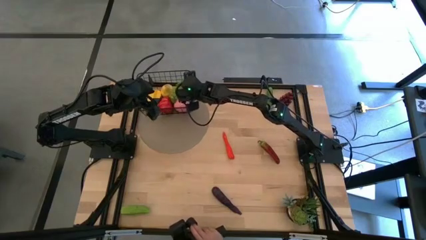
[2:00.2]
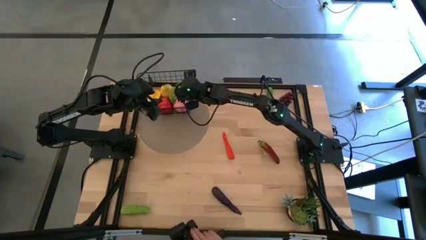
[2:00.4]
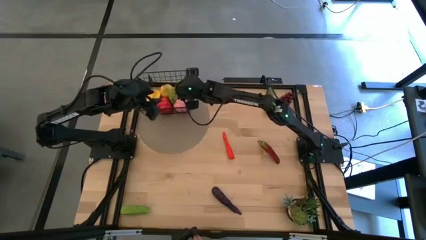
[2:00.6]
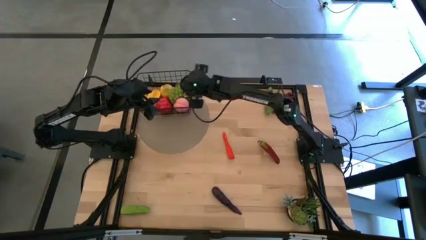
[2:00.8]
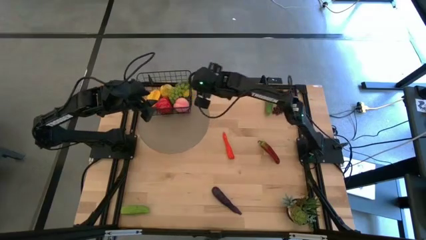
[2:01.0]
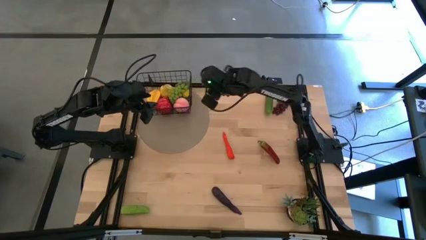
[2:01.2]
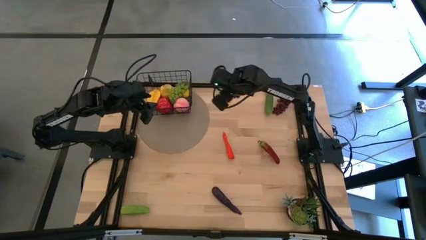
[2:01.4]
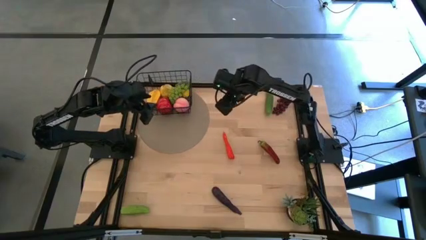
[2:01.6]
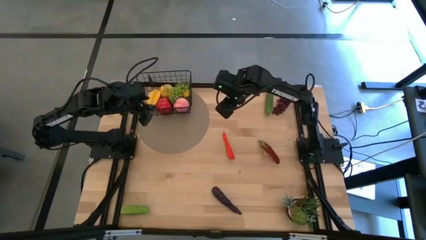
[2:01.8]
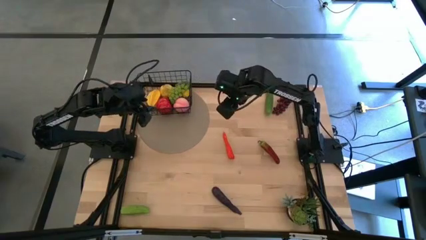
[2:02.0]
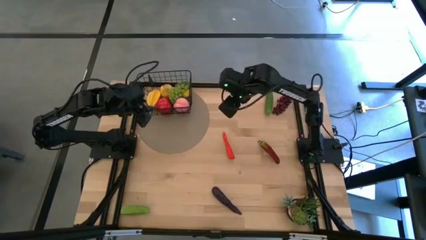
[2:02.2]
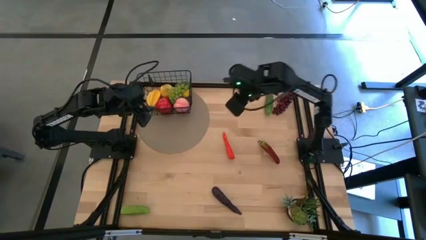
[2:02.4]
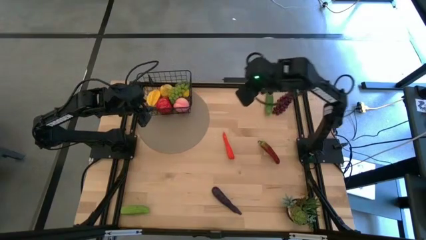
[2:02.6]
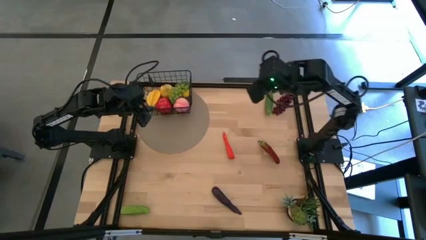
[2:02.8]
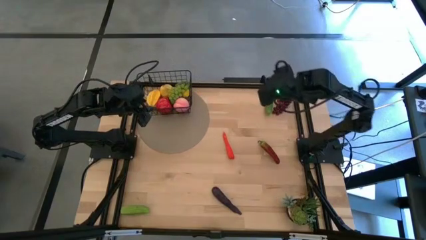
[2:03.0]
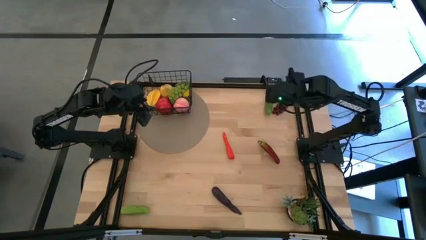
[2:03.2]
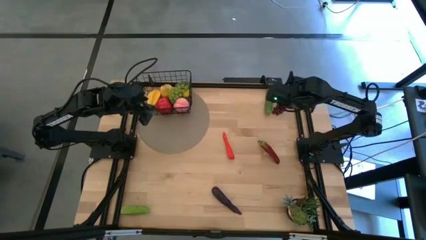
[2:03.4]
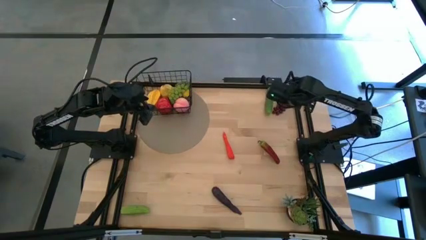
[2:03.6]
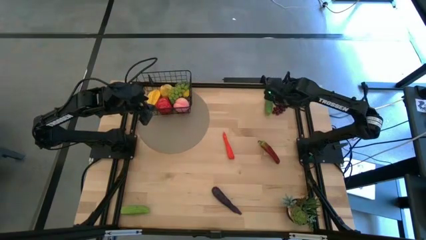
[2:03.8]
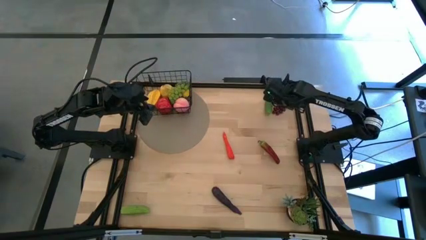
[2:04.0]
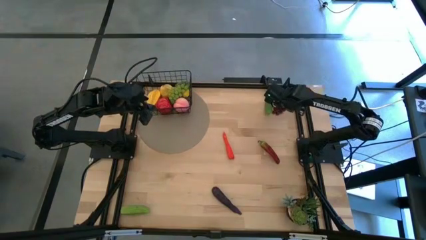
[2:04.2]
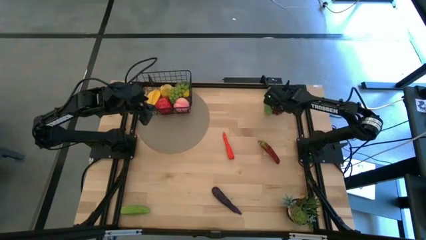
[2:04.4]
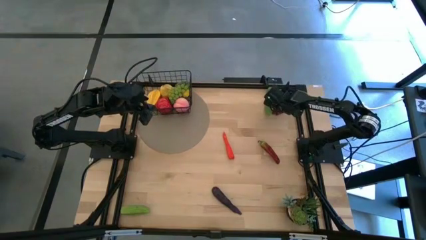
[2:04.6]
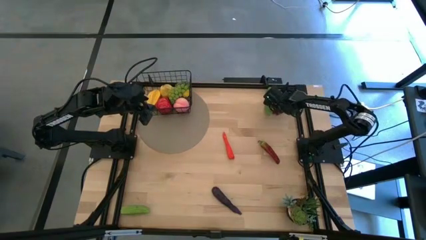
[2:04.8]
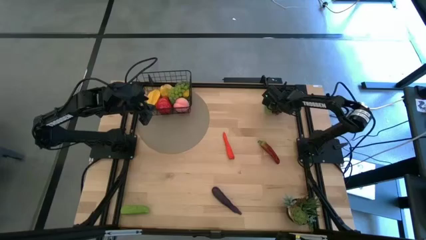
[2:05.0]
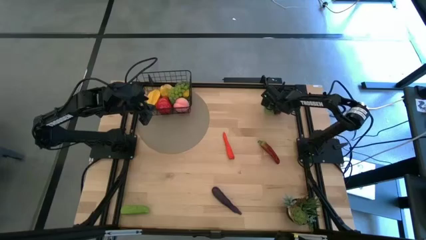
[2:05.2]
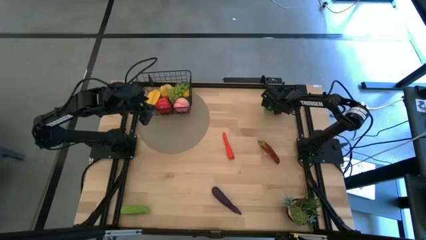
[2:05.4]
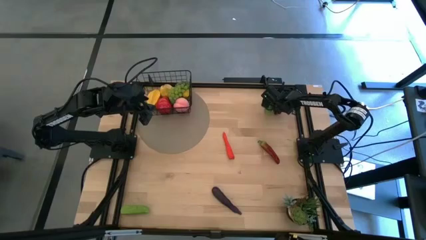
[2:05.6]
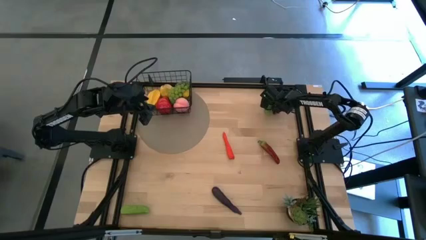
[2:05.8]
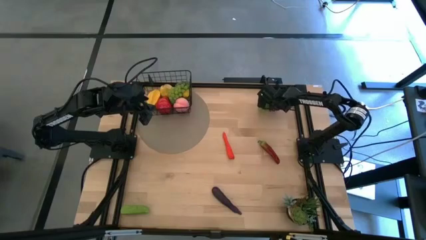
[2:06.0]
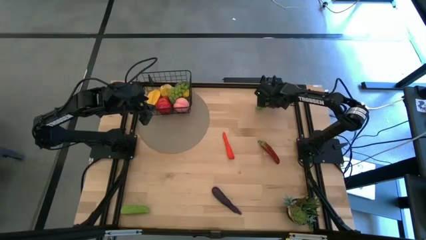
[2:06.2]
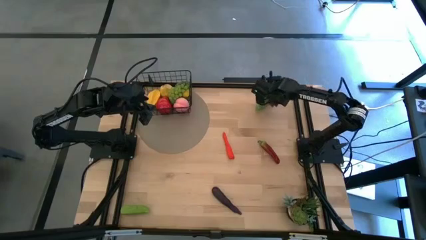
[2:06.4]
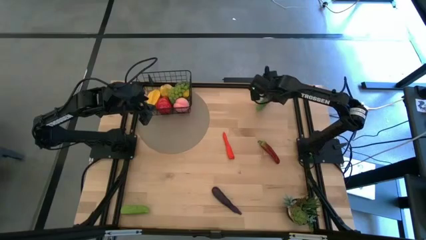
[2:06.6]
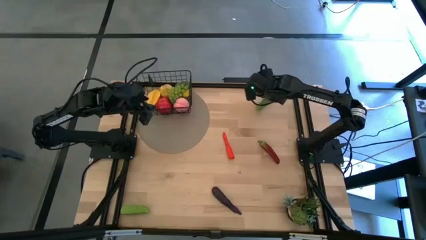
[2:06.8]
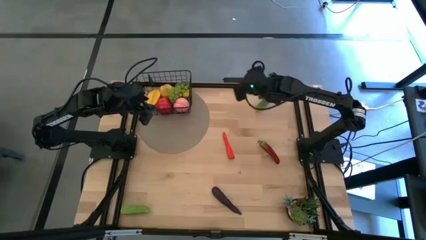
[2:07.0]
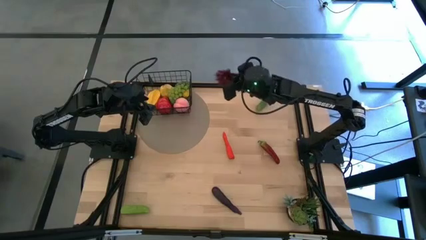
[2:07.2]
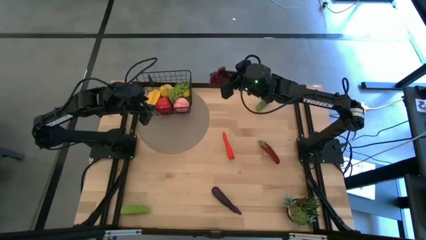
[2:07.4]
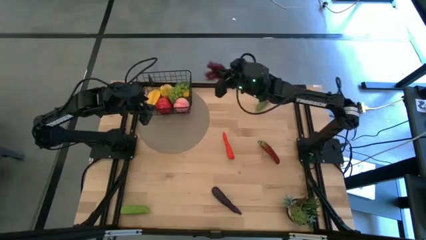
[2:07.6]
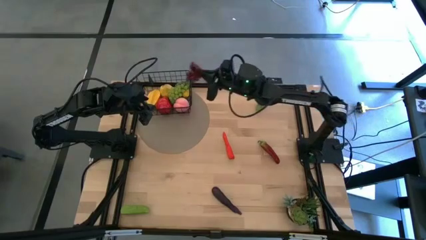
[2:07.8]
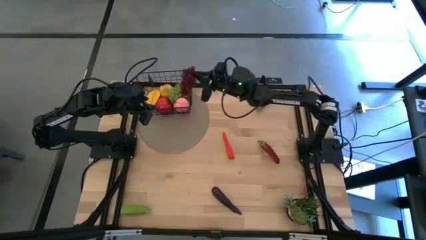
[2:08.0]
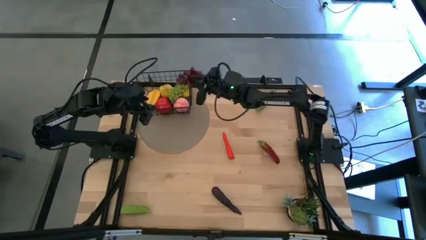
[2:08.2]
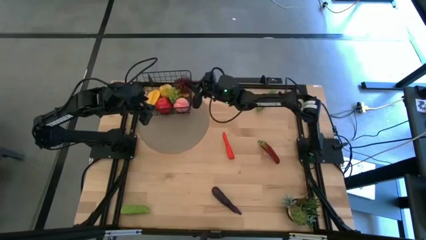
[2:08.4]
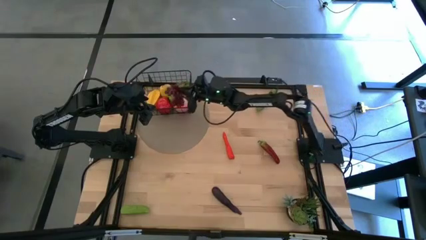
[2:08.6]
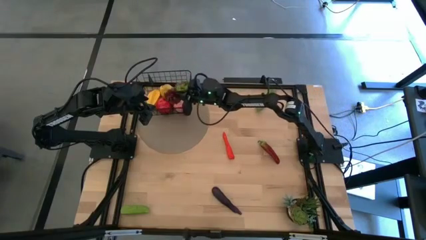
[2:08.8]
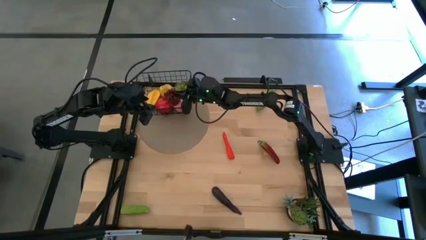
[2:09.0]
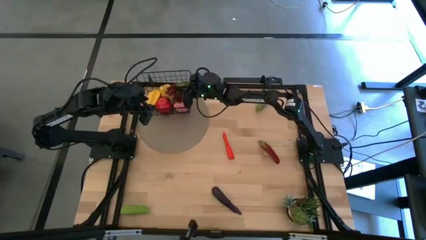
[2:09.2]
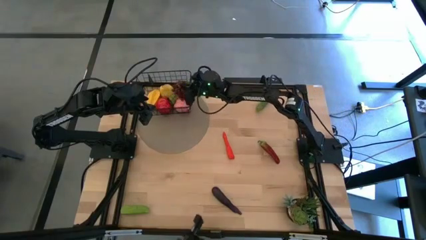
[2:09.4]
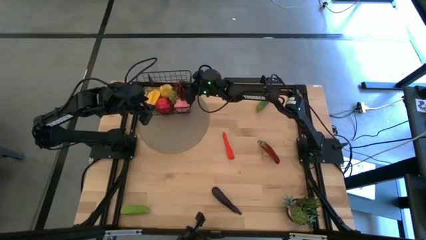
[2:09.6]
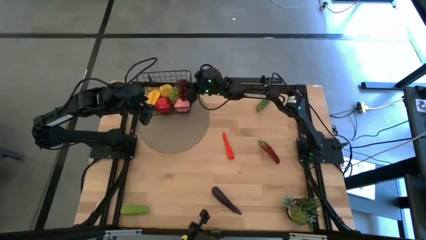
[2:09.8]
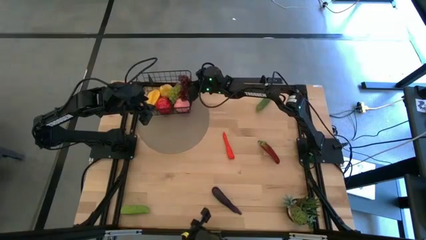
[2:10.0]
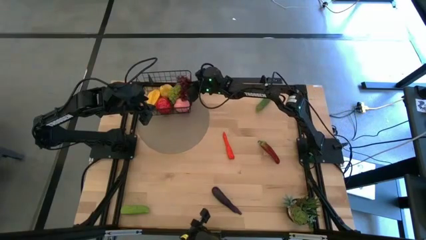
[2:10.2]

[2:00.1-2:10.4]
Task: Build produce basket
Put the red grapes into the black wire basket

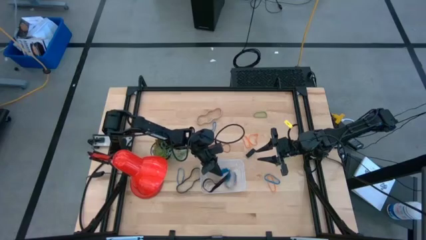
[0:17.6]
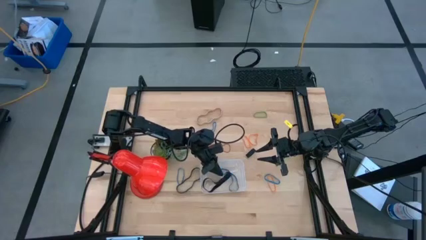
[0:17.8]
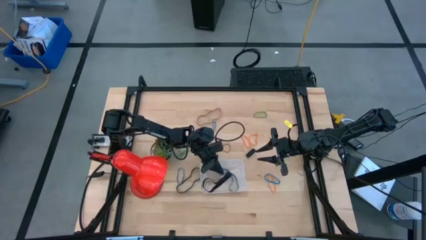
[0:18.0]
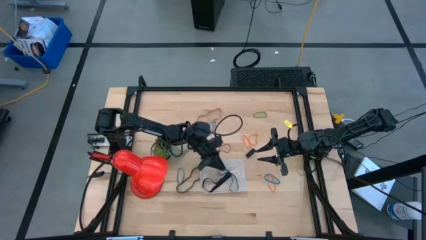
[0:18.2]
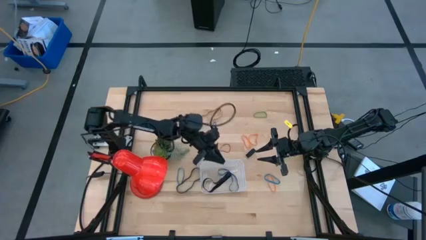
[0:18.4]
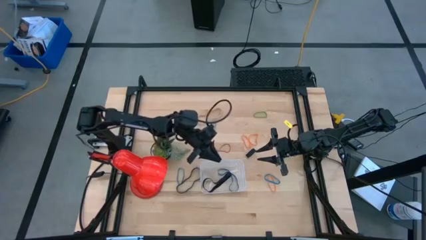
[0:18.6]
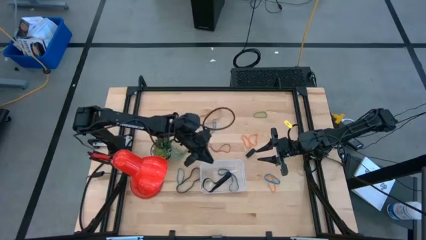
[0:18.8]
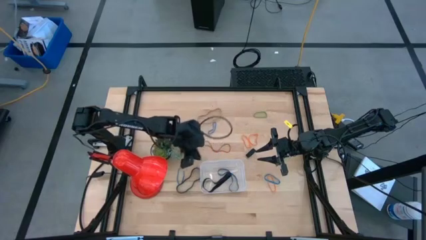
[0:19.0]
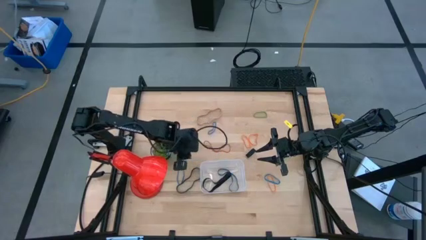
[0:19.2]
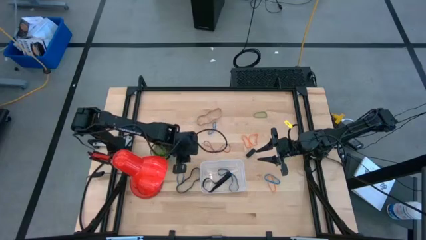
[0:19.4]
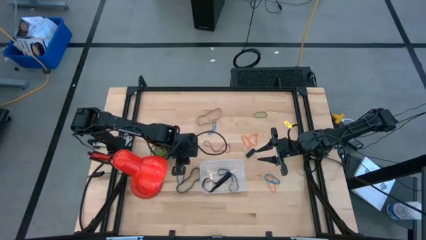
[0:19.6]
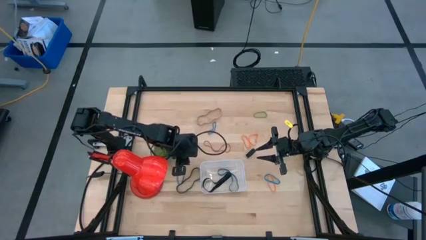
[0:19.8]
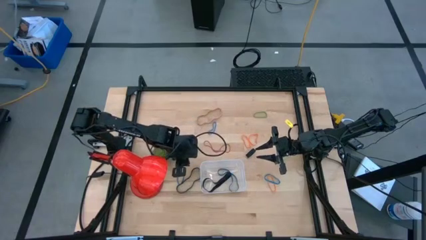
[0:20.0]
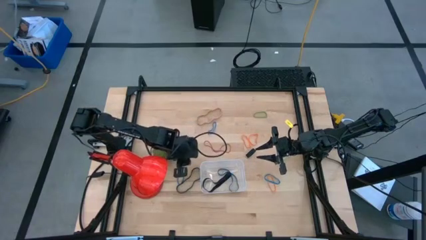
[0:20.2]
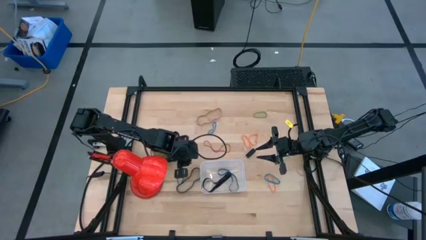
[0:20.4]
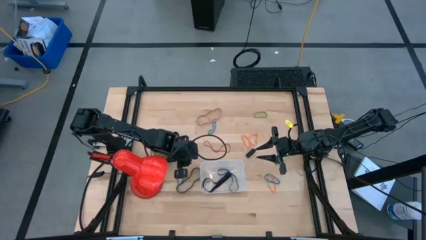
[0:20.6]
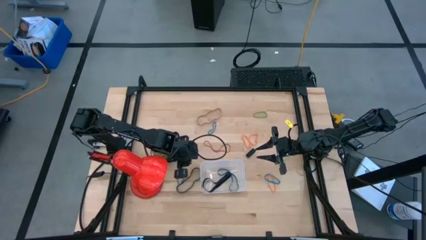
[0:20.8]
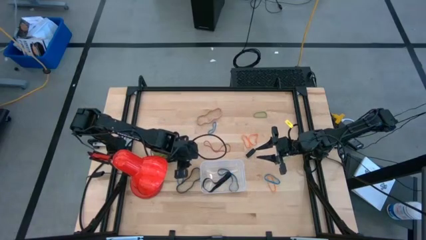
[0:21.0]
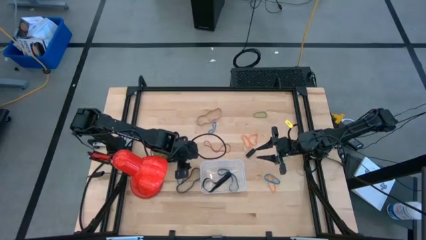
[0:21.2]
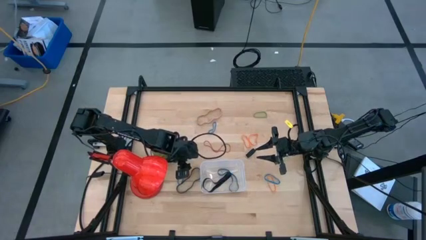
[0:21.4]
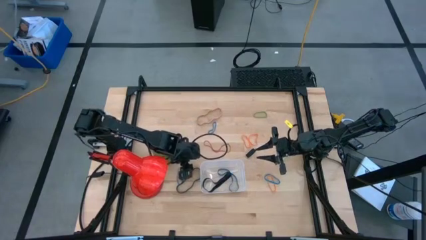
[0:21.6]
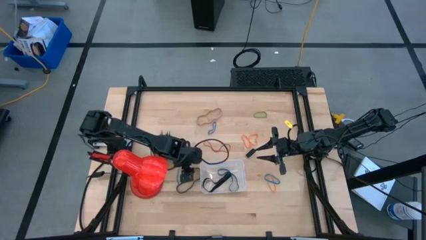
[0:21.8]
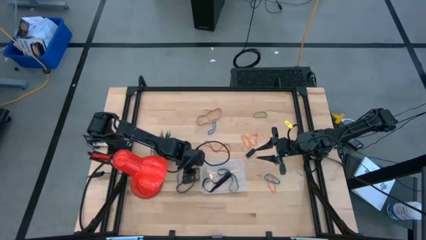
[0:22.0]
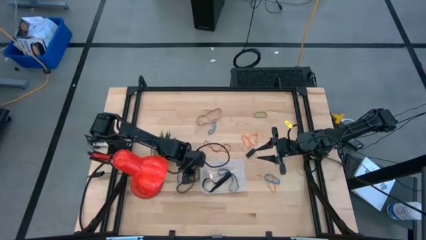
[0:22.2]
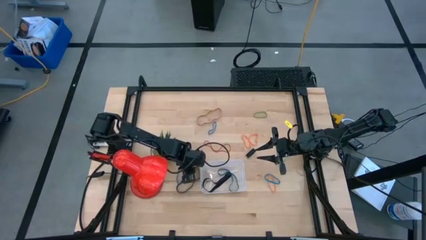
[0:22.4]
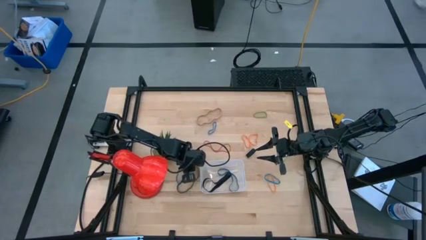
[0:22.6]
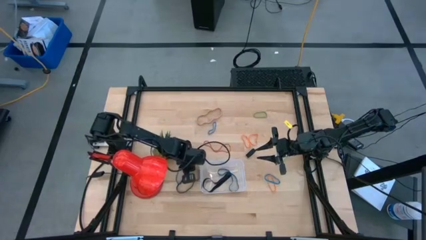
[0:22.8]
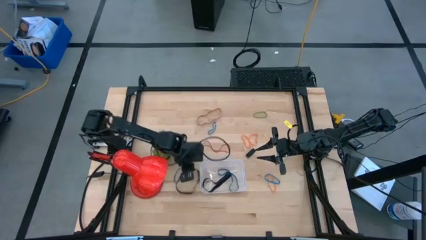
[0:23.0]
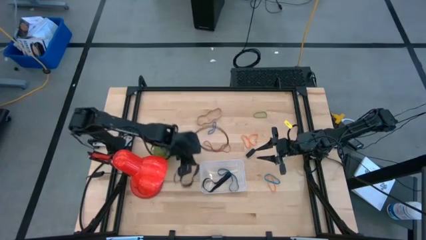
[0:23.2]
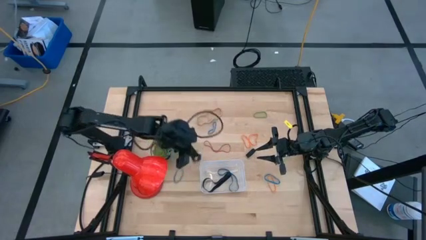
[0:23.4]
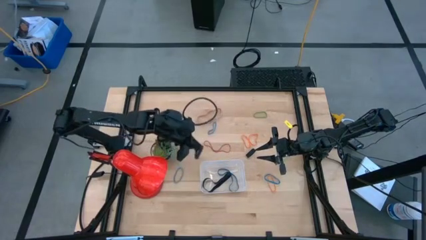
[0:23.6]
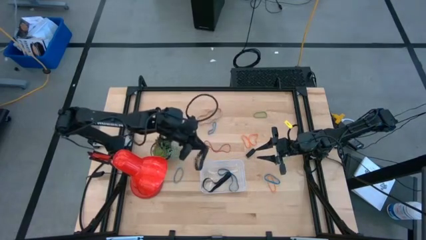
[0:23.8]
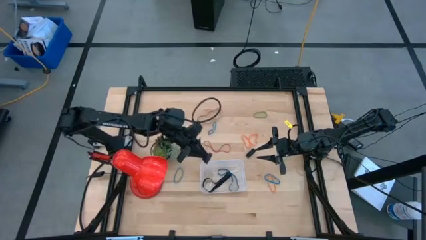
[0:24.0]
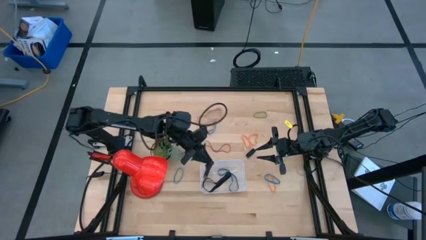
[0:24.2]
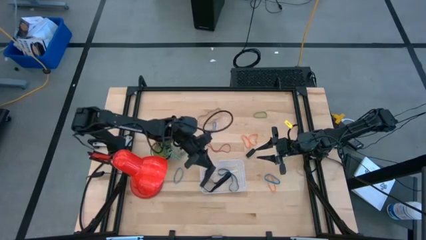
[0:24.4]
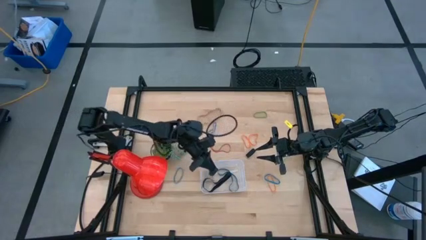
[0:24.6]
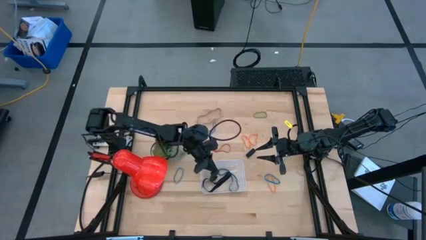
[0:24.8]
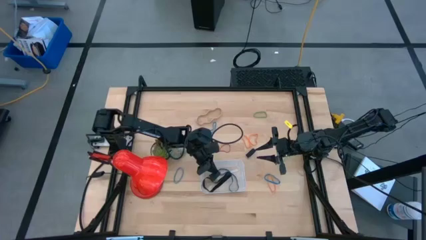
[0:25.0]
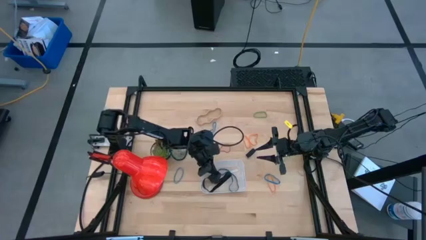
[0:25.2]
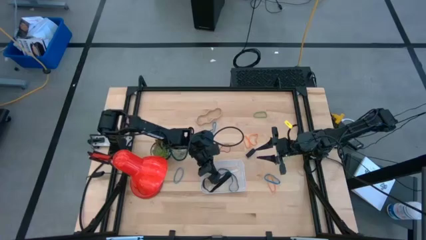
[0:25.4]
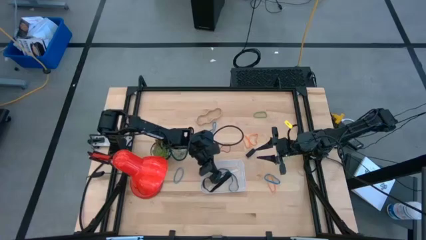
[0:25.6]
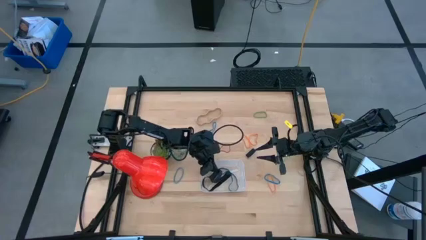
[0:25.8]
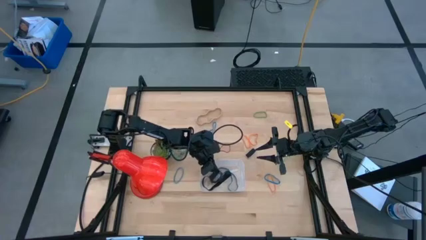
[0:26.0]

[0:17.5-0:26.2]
Task: Pick and place rubber bands into bin
Put the black rubber band into the bin
